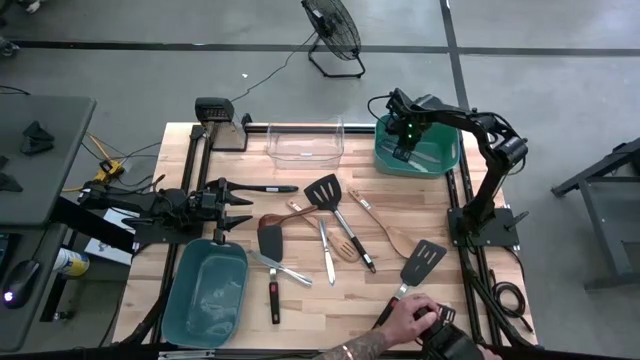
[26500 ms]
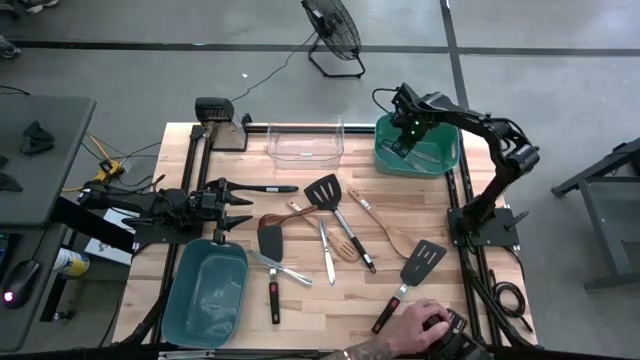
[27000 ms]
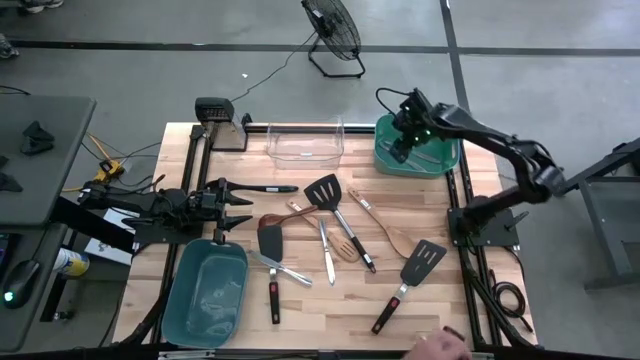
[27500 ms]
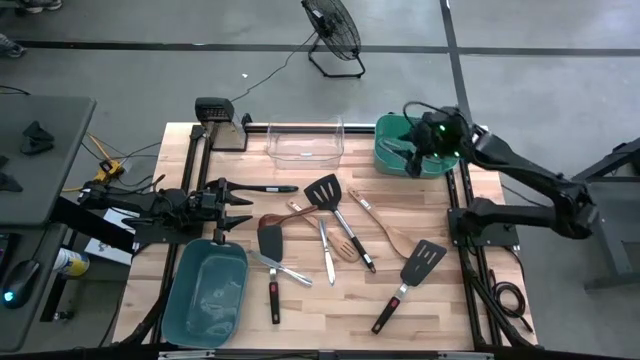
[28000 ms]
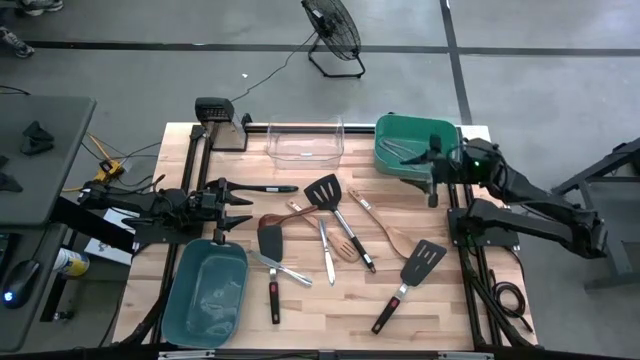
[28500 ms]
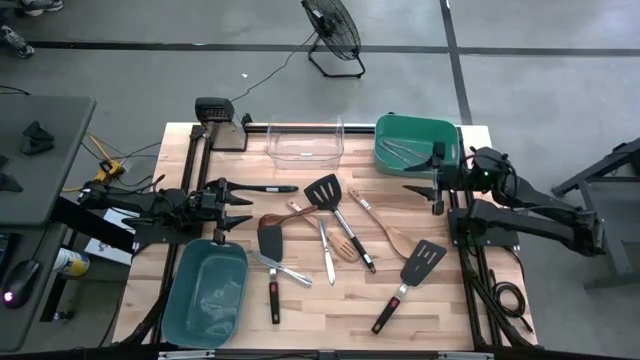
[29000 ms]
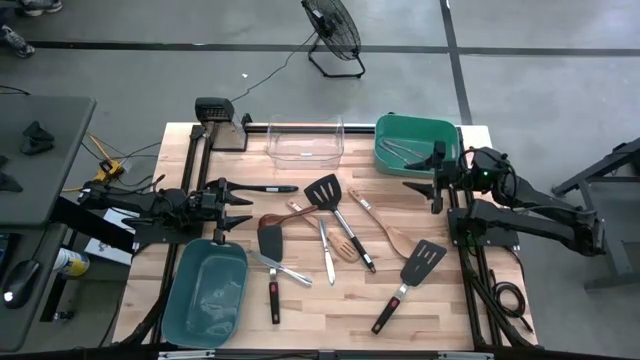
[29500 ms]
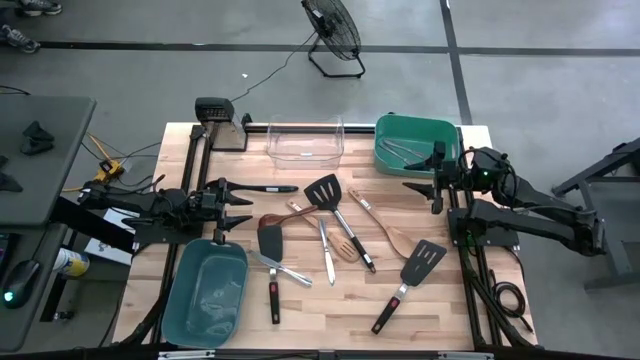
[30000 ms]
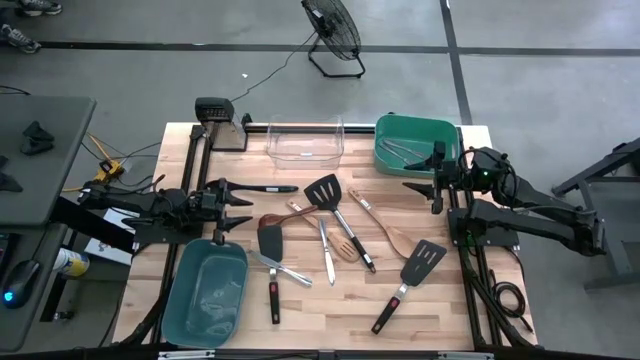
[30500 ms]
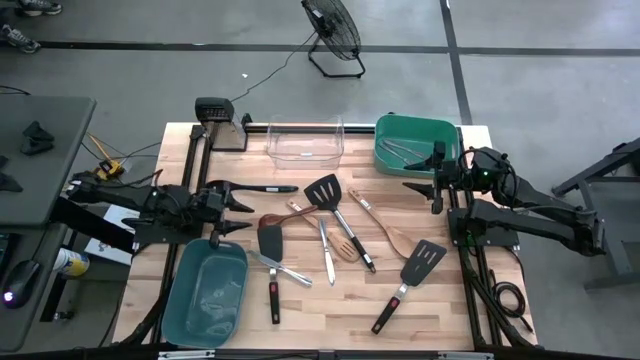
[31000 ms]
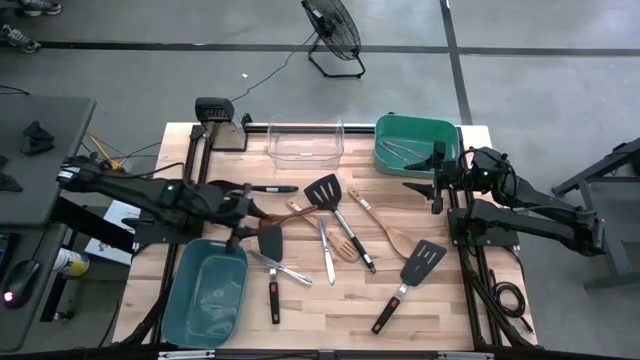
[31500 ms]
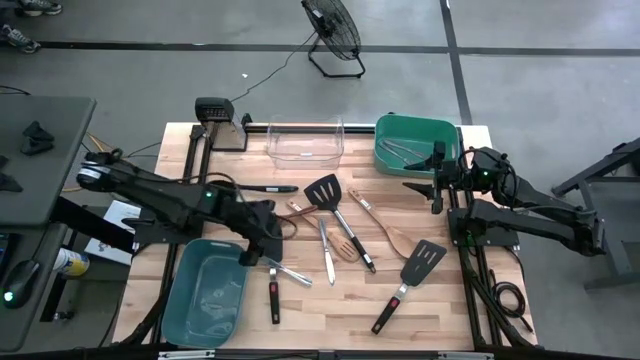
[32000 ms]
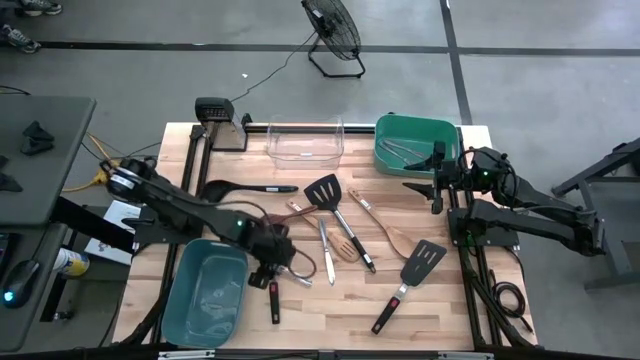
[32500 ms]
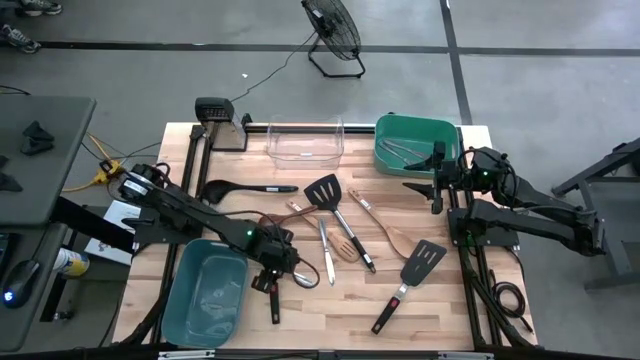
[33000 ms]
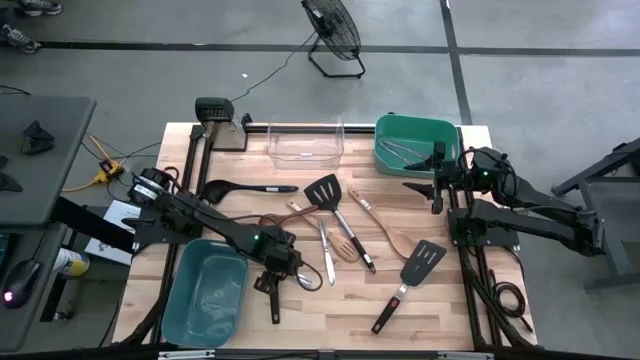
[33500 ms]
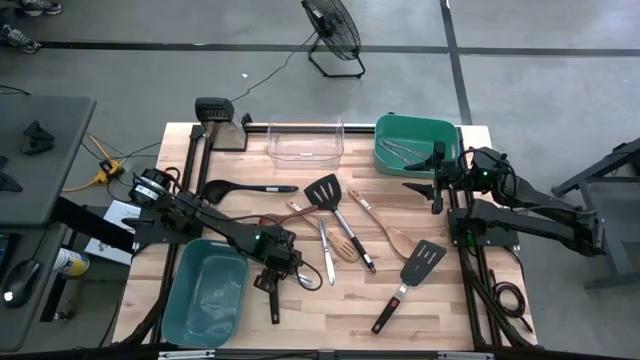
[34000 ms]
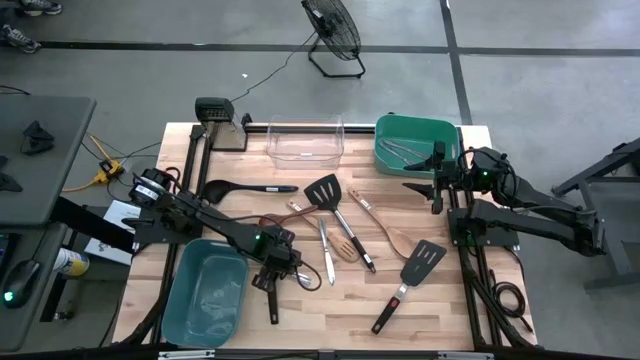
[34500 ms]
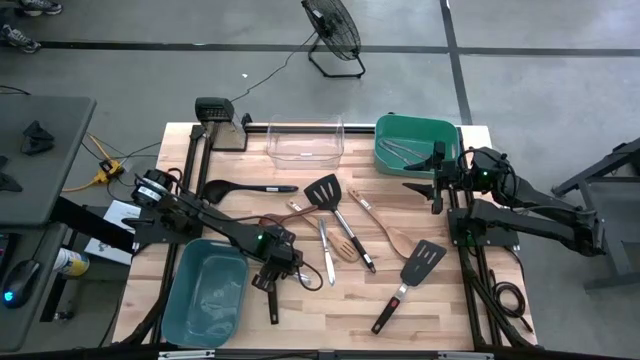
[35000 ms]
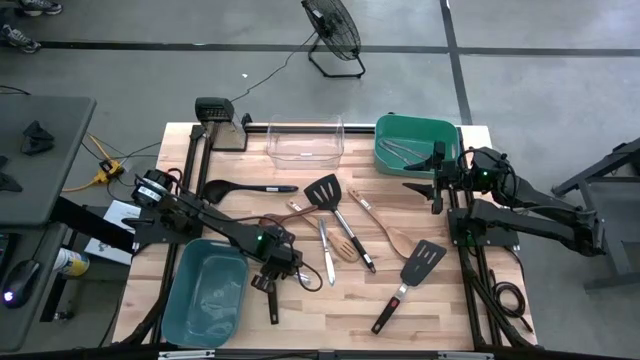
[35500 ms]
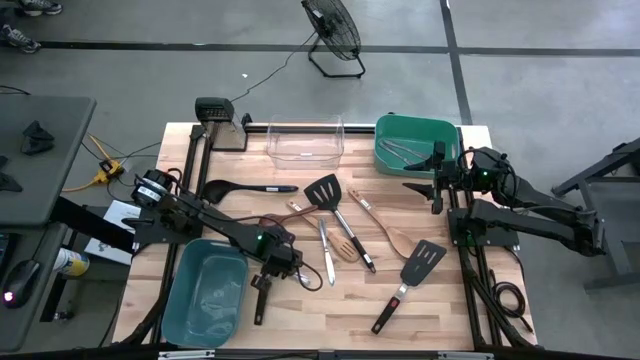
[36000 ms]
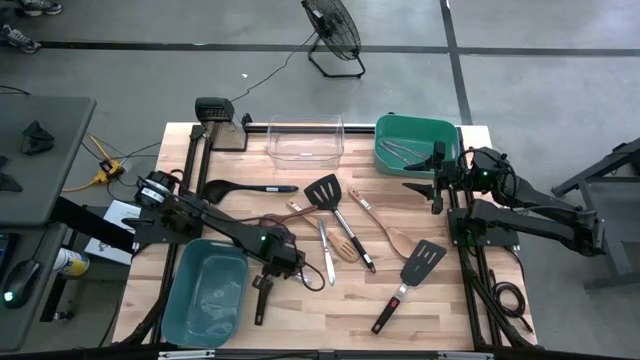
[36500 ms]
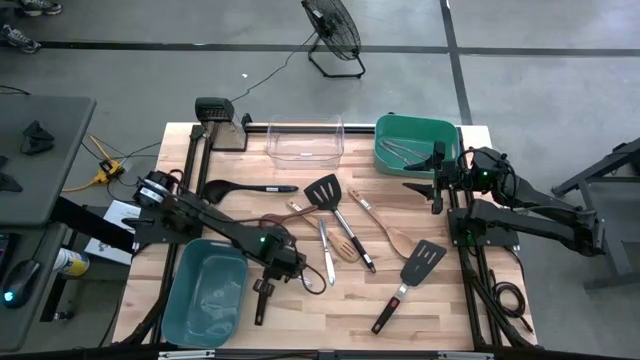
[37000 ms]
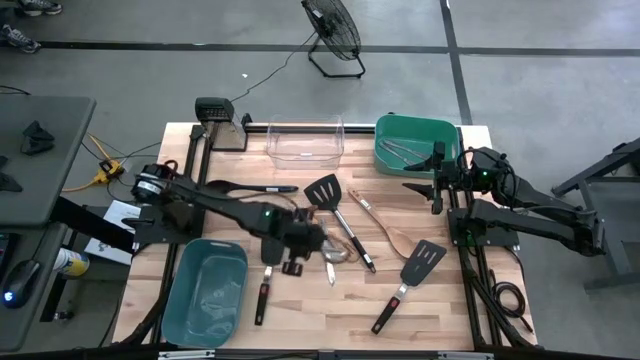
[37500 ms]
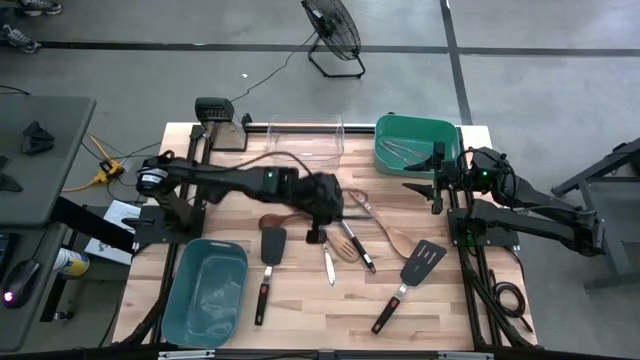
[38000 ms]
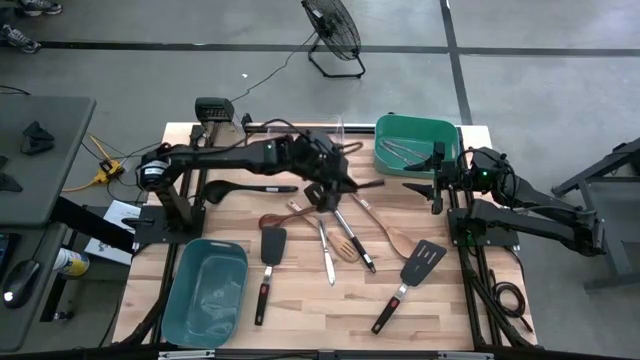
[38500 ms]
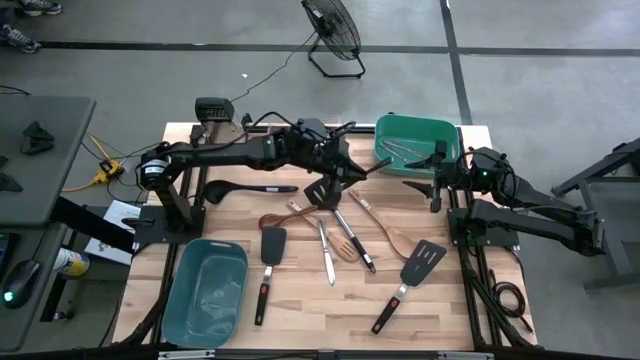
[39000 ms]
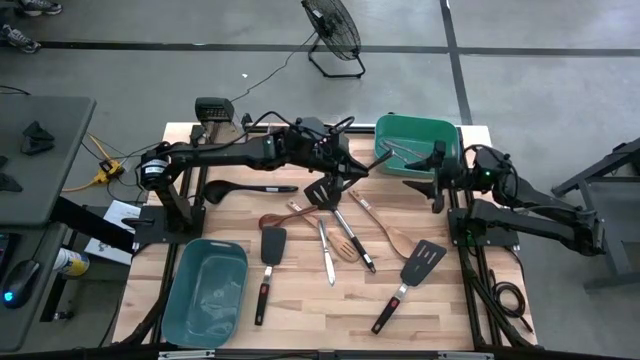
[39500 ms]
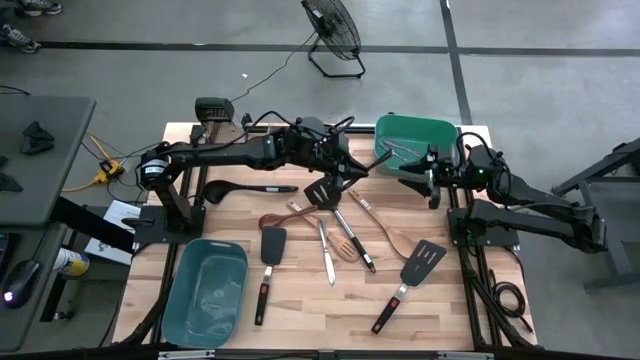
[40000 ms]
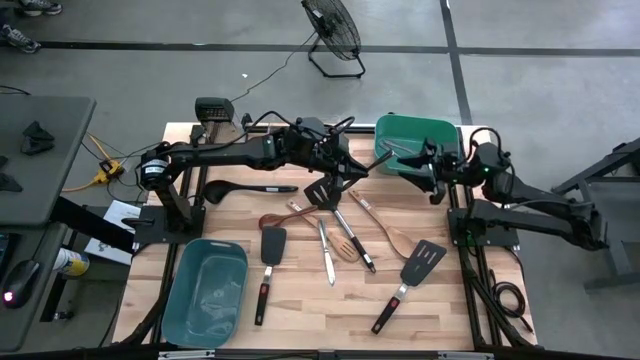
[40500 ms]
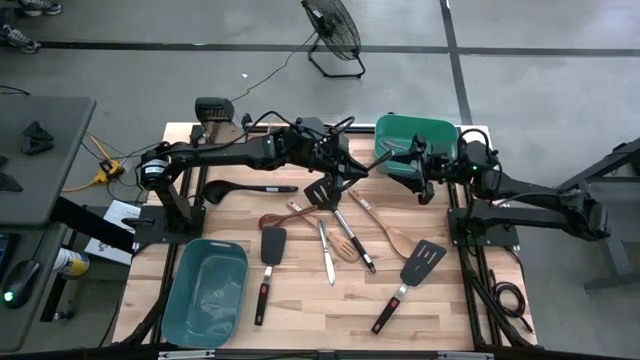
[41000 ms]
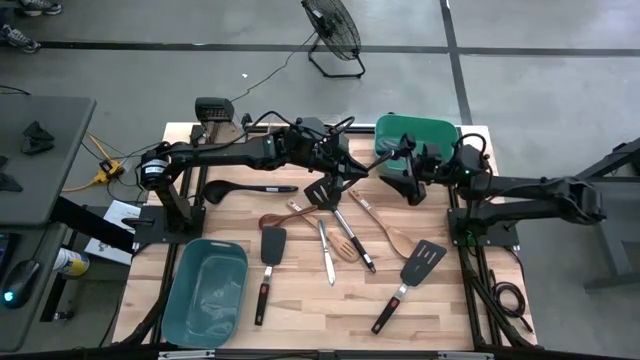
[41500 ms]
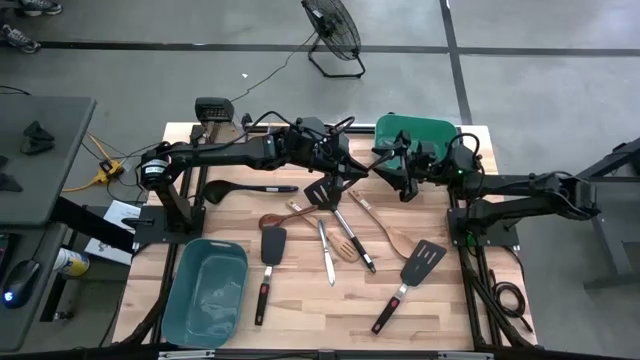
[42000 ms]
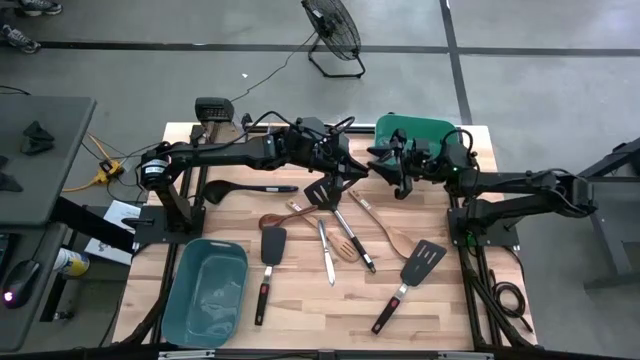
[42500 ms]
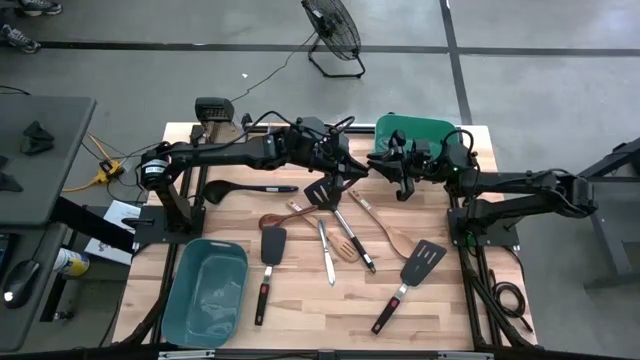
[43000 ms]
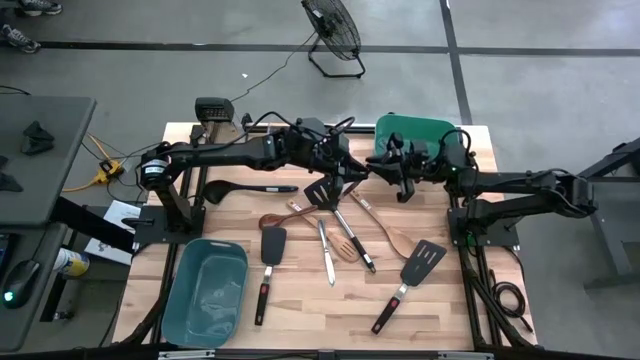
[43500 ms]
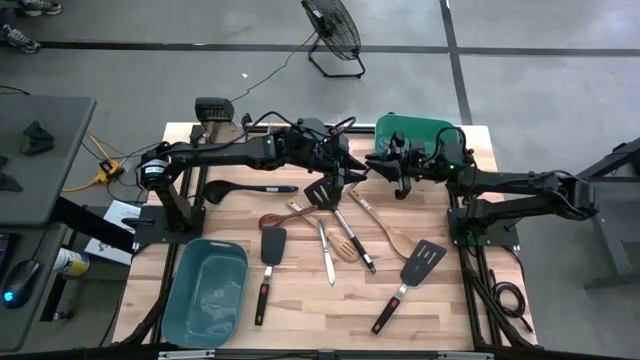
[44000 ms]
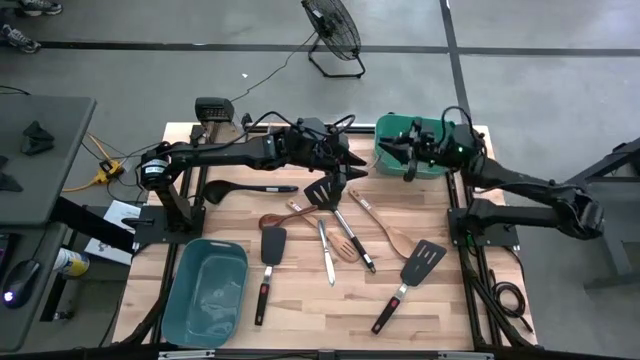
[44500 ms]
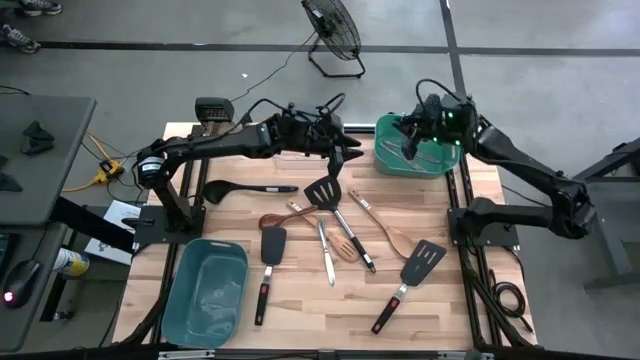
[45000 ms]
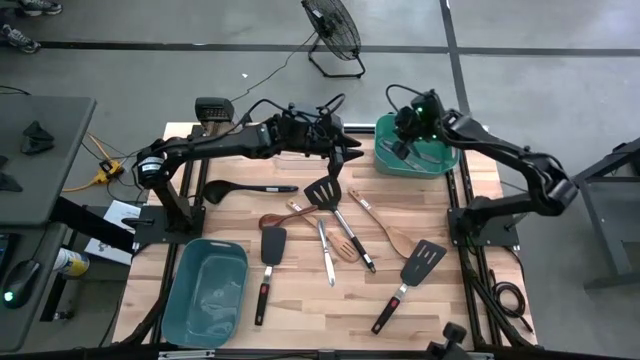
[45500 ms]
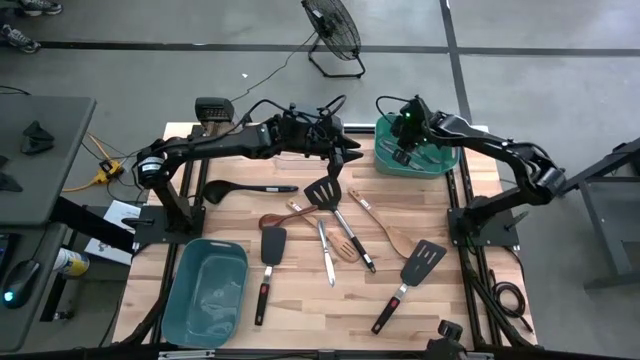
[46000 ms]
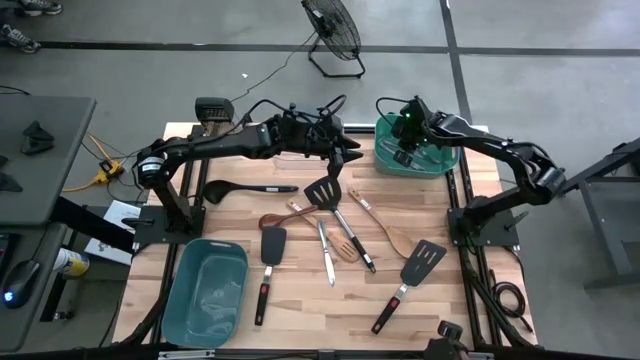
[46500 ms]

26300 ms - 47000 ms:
Task: Pick & Place Kitchen Items
Put the left dinner knife into the green bin
